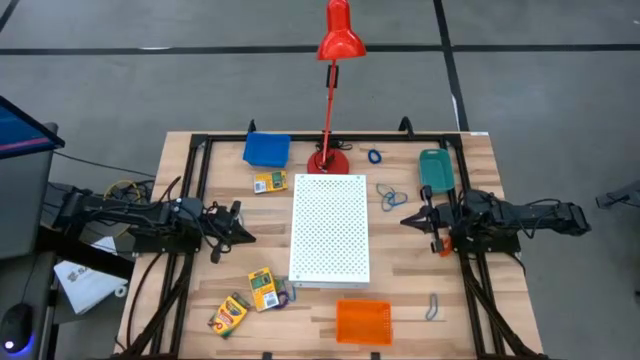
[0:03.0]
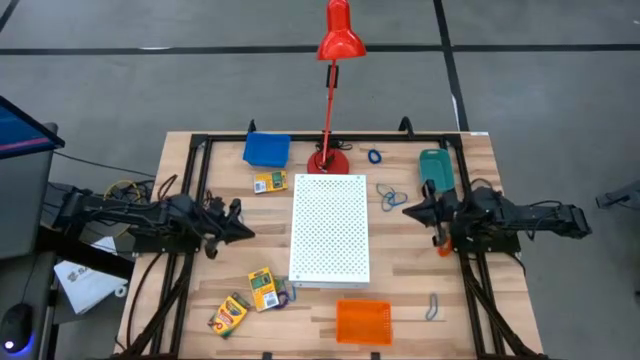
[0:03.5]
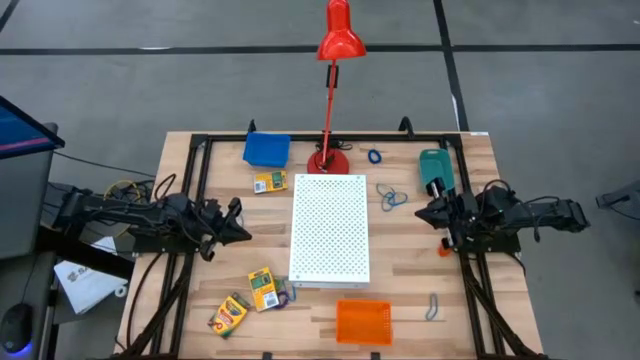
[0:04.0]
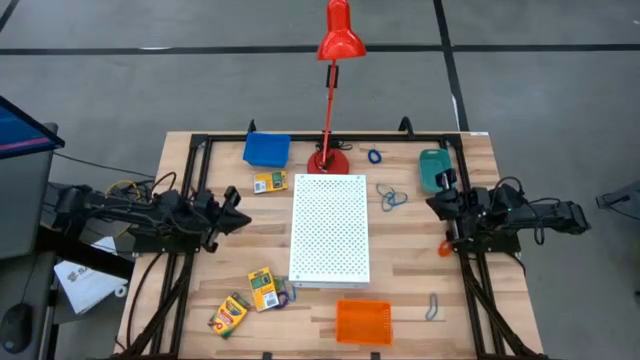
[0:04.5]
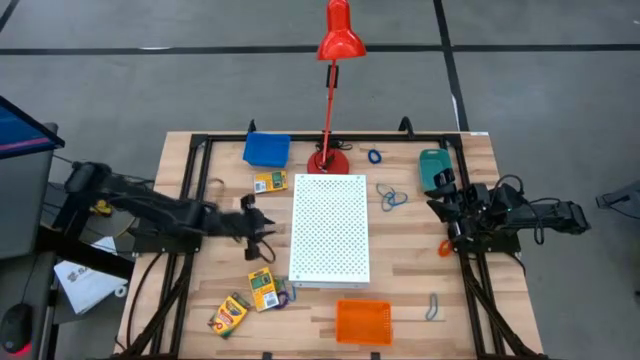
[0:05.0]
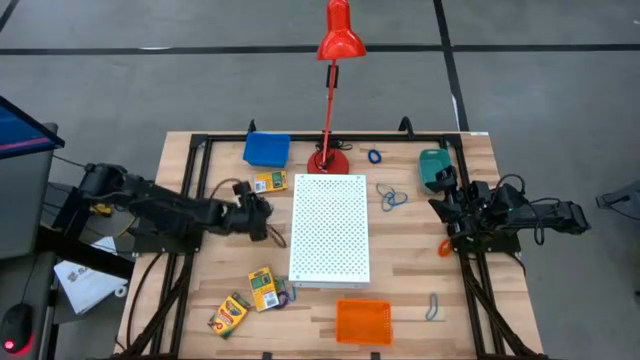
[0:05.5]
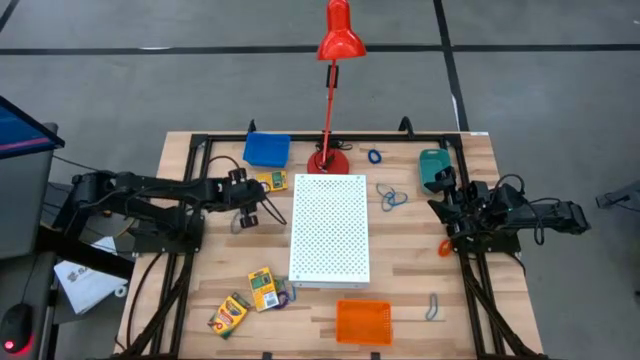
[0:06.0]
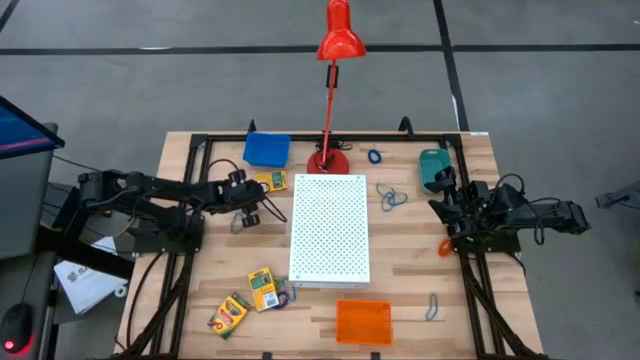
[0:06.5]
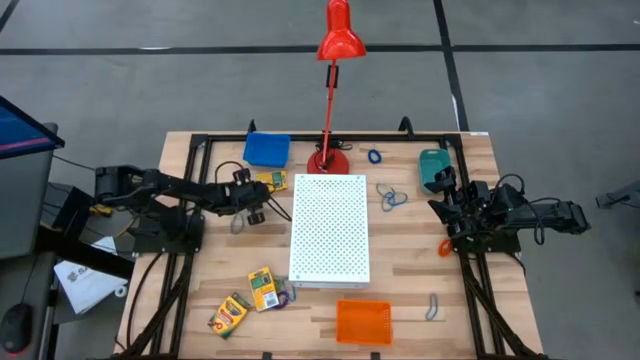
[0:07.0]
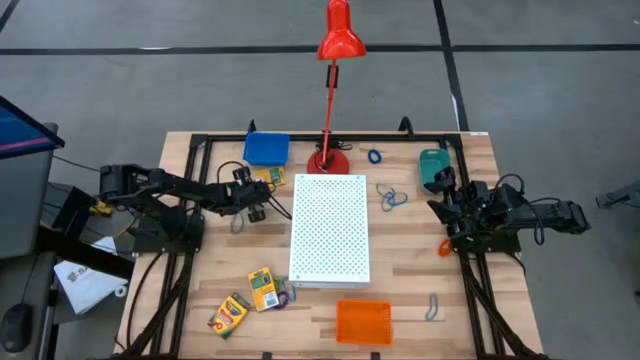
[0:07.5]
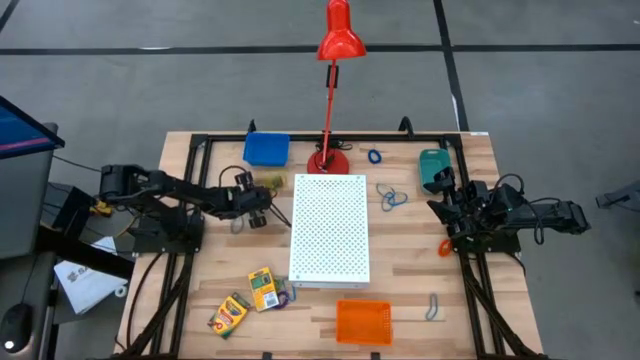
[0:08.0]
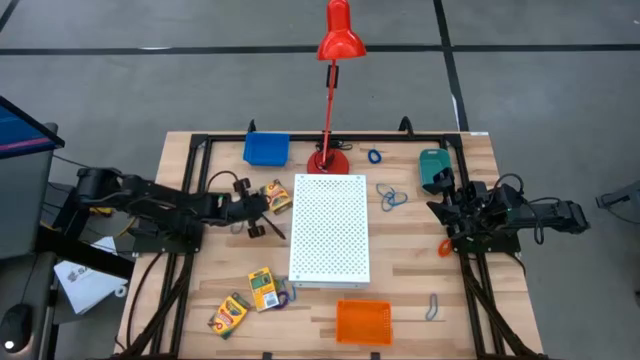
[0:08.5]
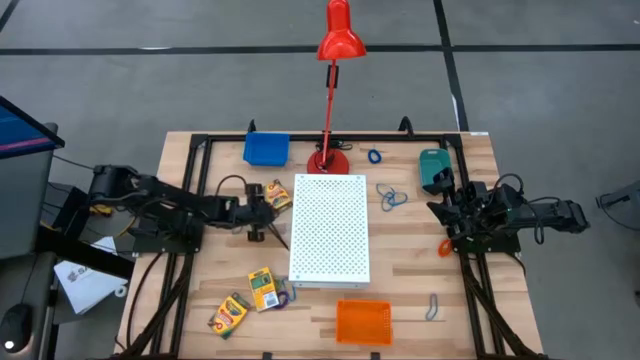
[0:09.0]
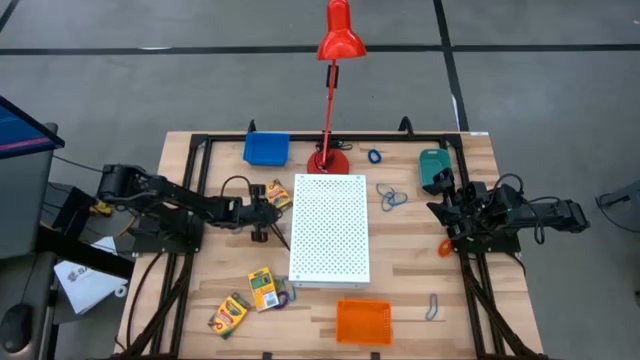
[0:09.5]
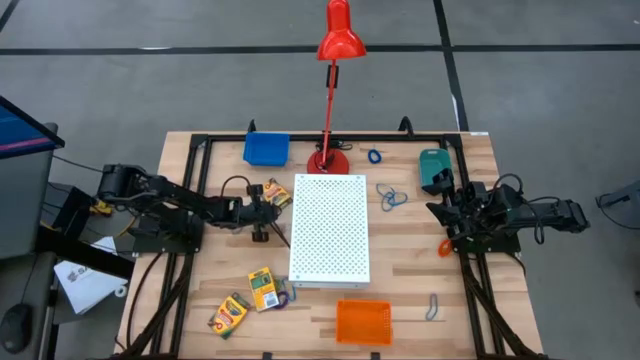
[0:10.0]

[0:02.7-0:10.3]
Task: Pick & Place Office Desk Supplies
Put the yellow crayon box into the green bin

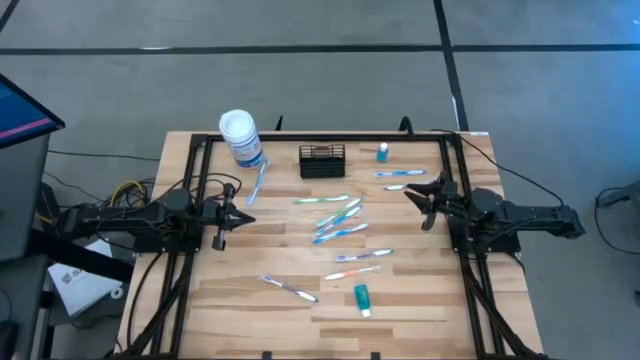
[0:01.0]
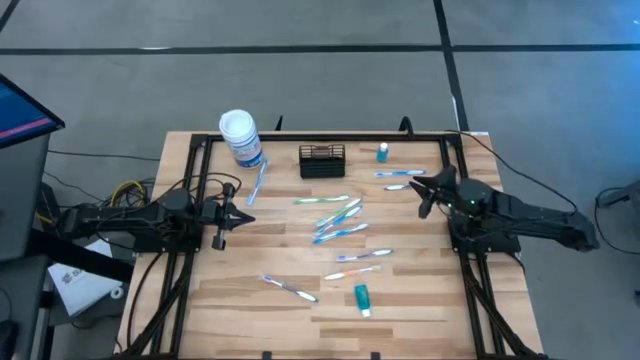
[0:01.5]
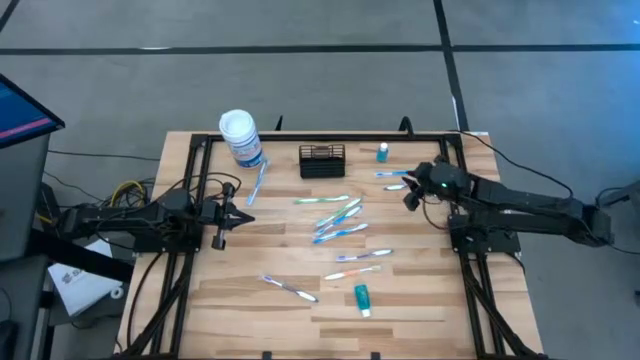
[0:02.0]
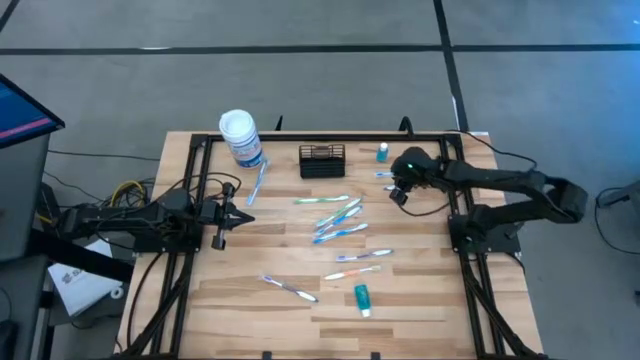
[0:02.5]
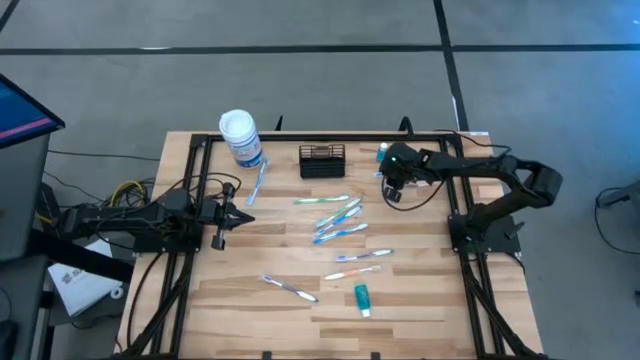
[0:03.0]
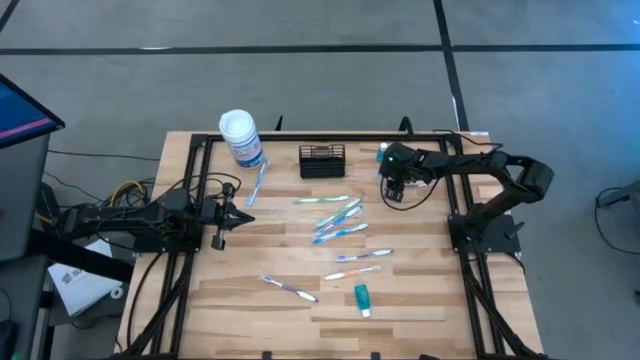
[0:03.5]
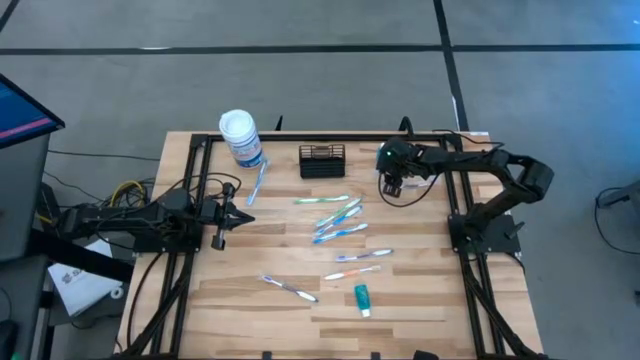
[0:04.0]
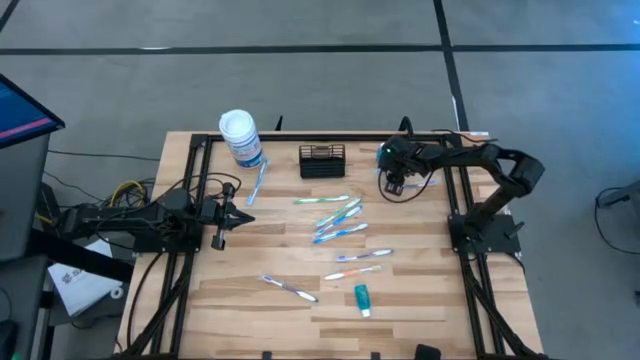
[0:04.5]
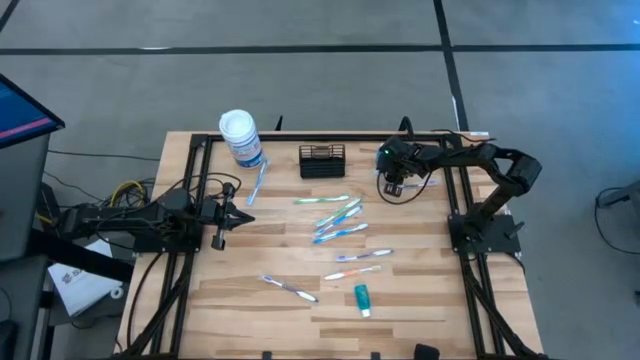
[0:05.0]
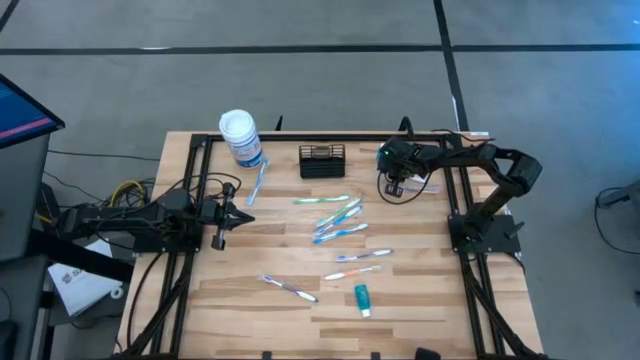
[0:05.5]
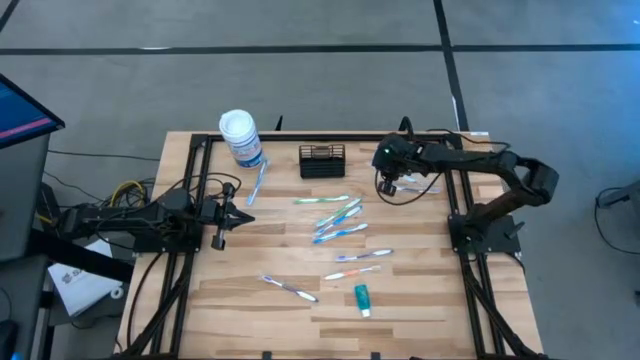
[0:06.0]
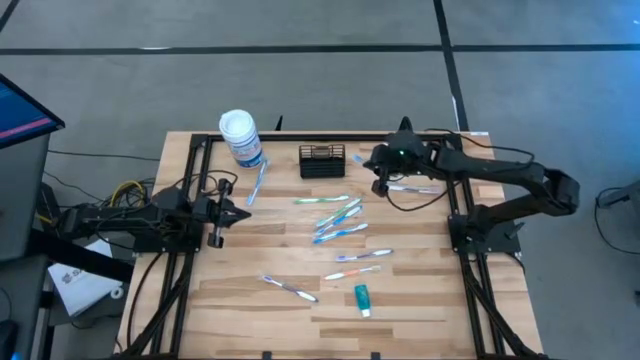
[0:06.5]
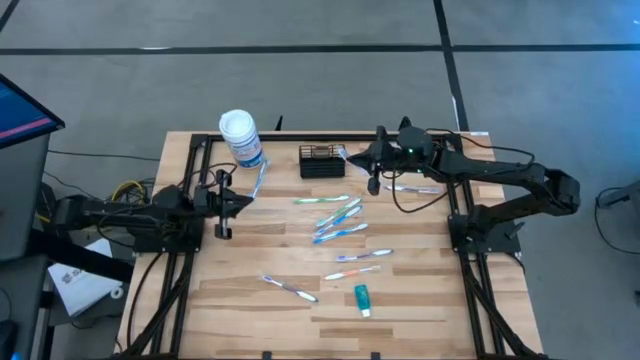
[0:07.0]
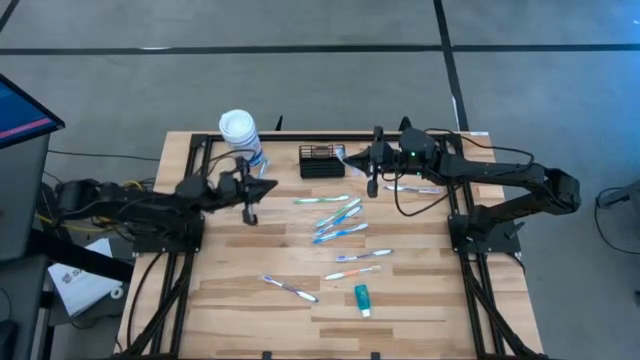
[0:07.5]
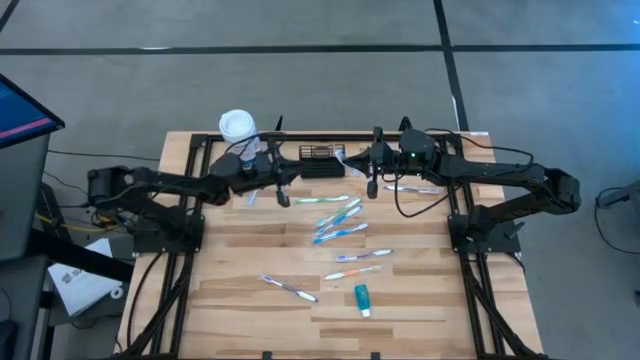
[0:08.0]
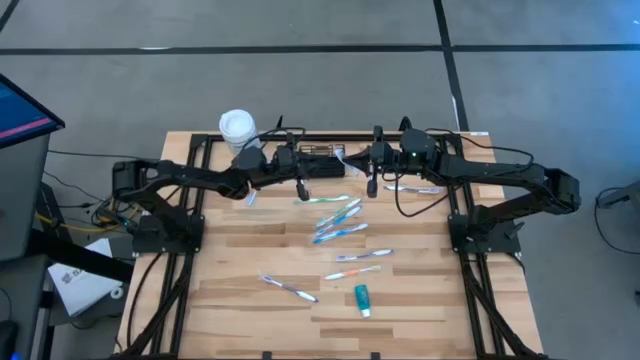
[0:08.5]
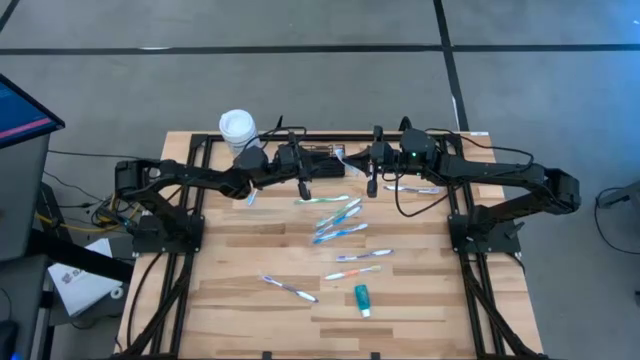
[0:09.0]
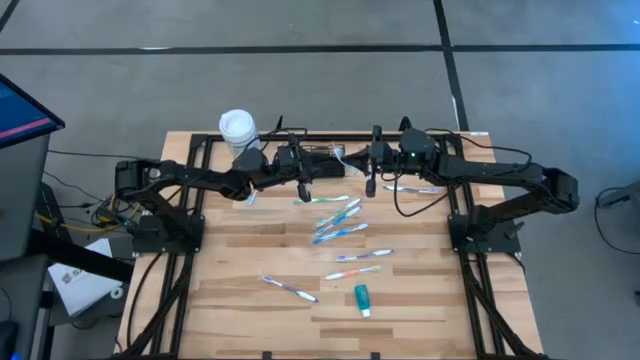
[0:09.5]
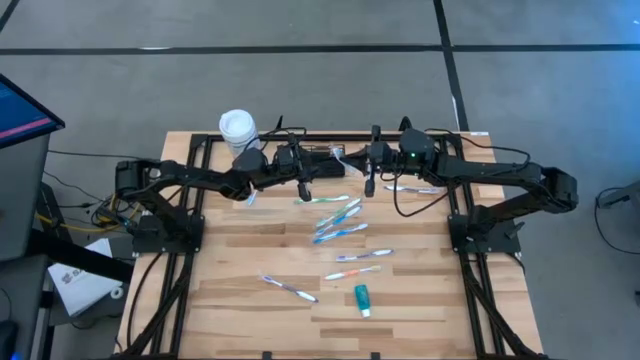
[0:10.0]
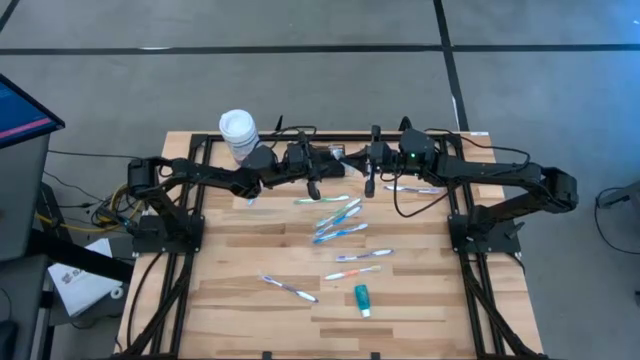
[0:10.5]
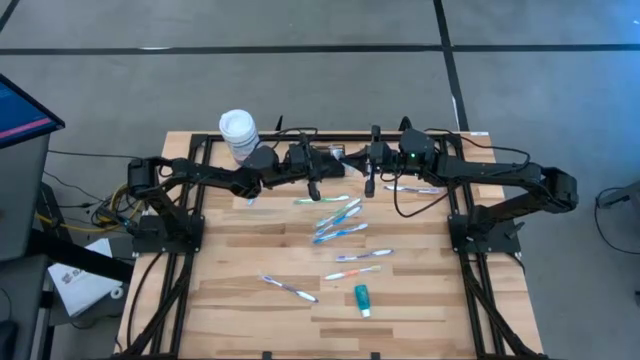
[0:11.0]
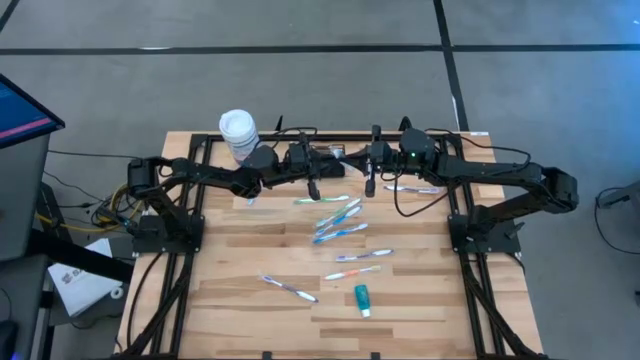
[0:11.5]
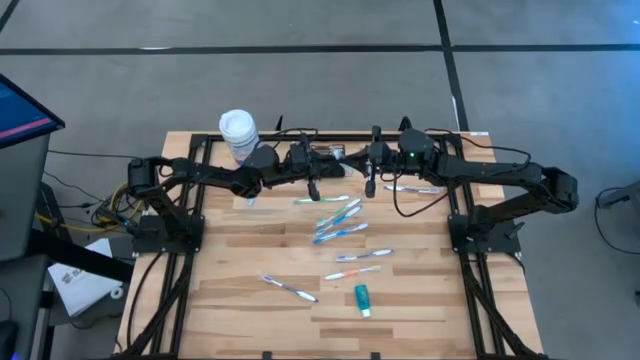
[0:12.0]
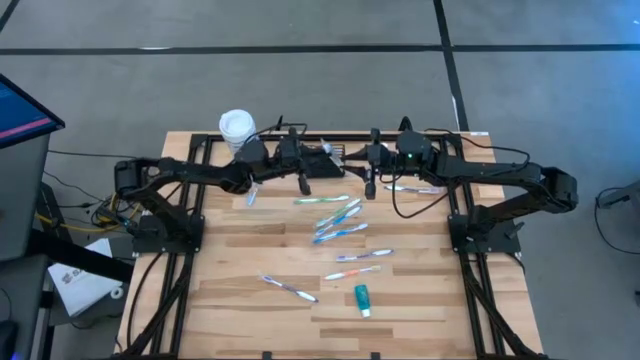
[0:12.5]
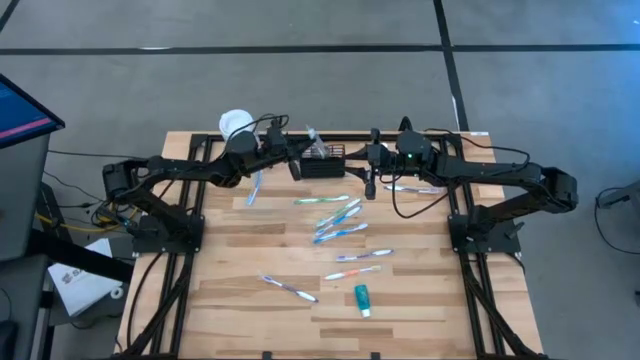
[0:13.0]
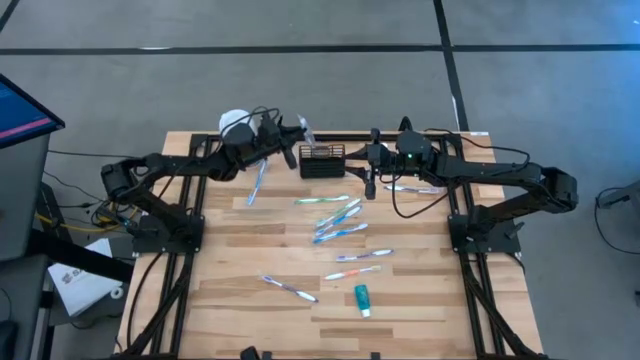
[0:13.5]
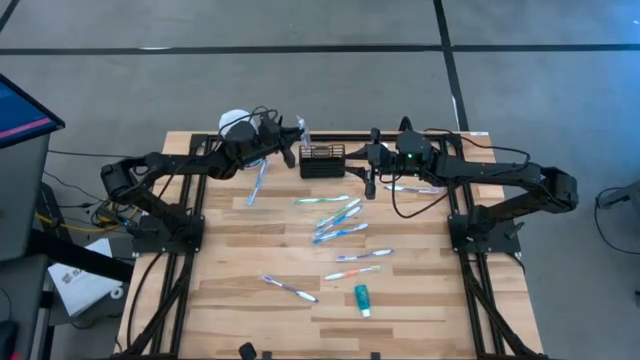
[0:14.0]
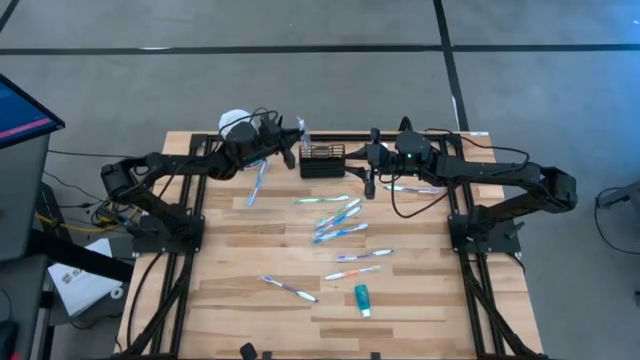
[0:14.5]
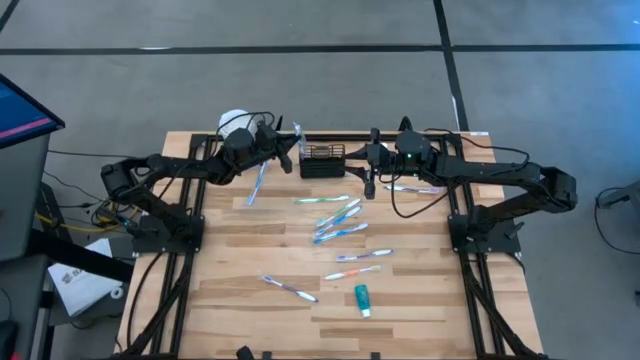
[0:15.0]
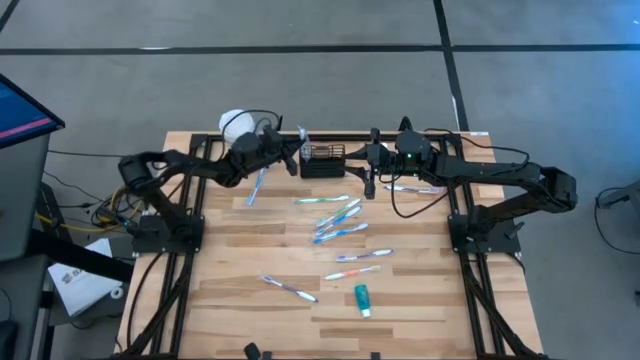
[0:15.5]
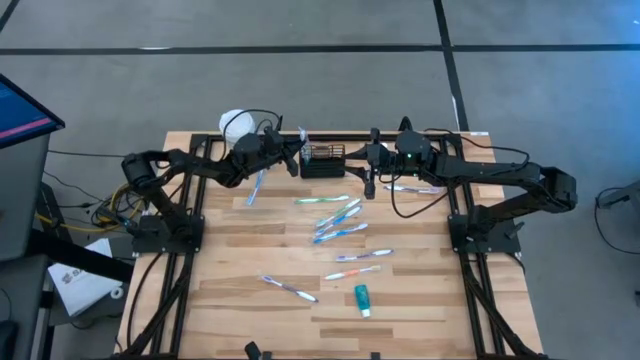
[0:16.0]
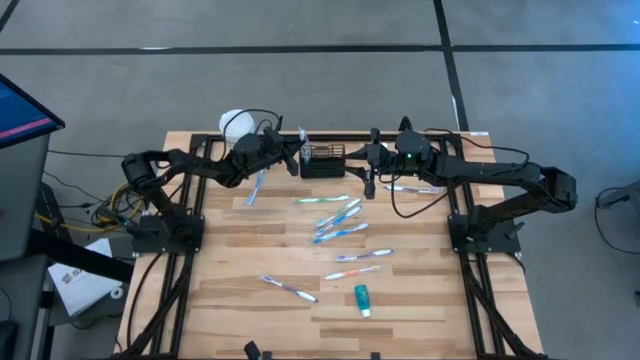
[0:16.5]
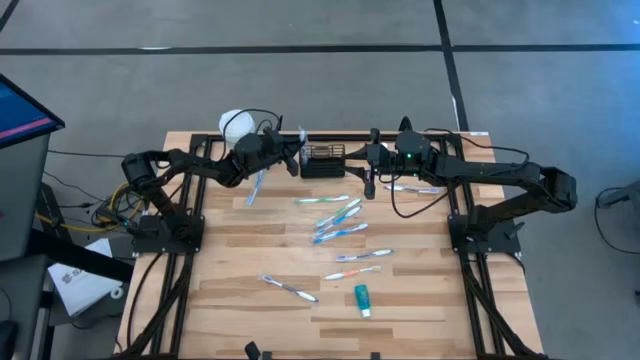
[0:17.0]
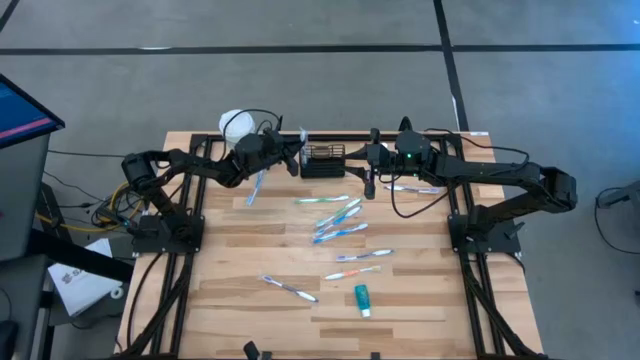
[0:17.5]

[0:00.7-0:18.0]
Task: Pick & Place toothbrushing station
Put the blue toothbrush into the black wire organizer
